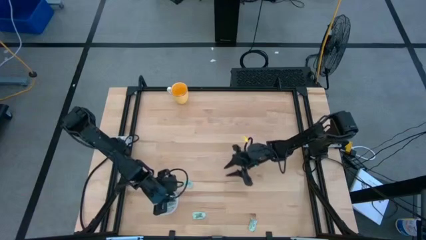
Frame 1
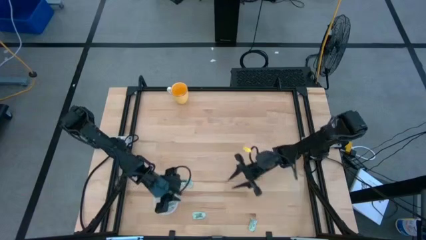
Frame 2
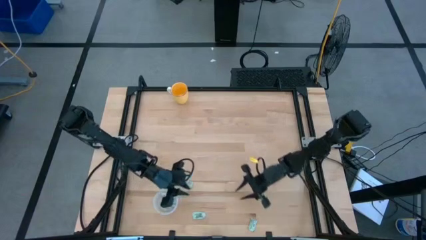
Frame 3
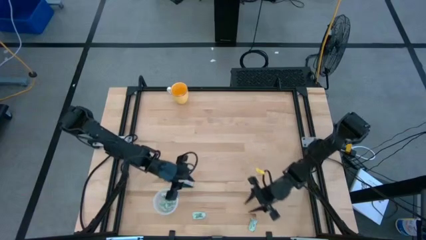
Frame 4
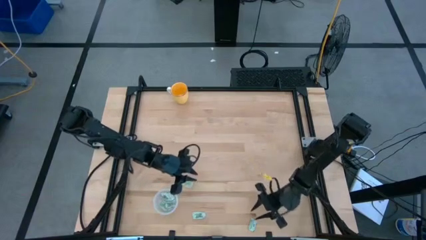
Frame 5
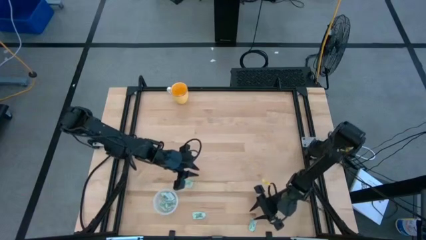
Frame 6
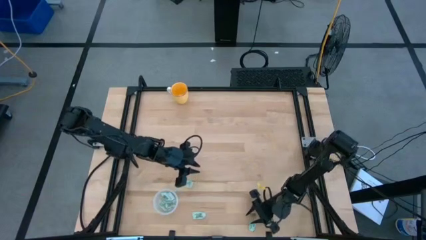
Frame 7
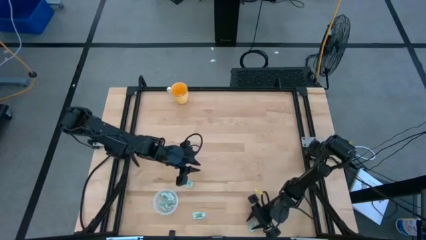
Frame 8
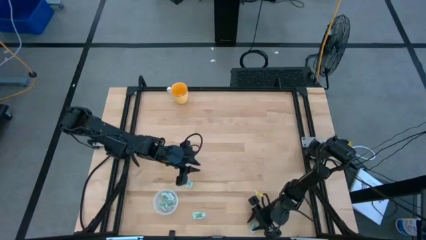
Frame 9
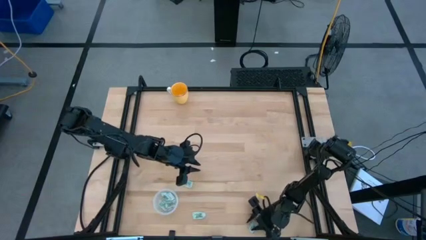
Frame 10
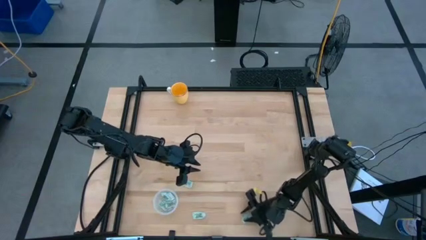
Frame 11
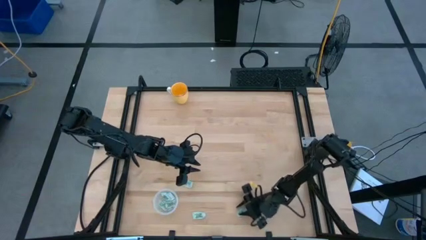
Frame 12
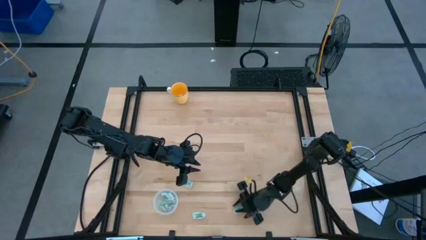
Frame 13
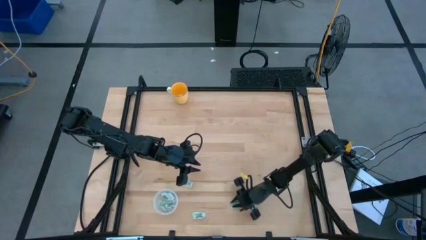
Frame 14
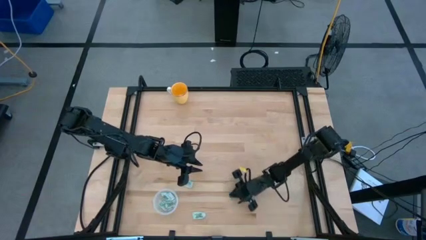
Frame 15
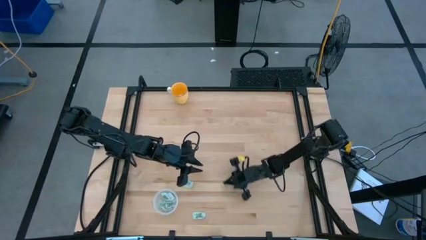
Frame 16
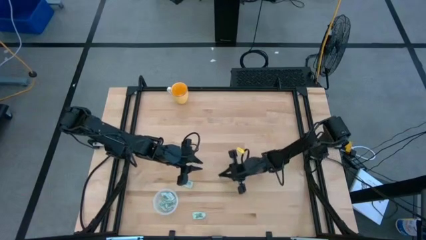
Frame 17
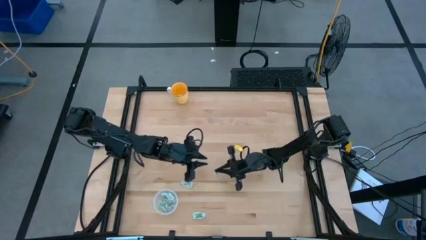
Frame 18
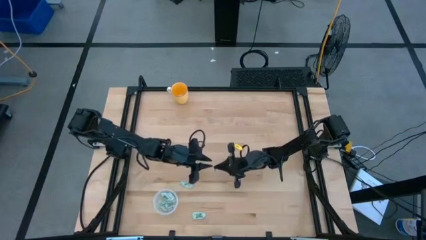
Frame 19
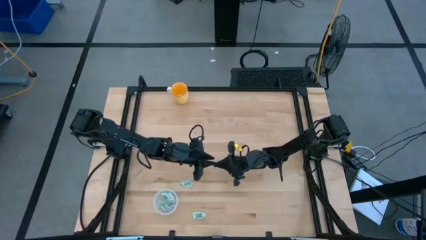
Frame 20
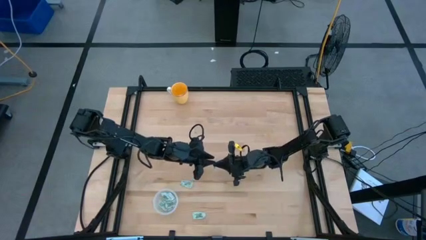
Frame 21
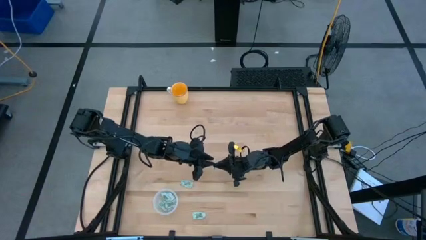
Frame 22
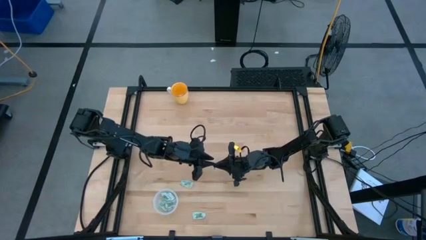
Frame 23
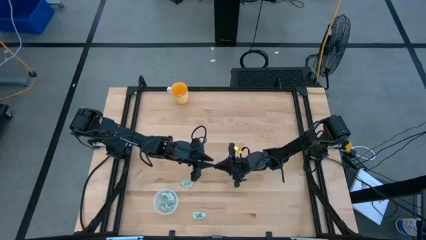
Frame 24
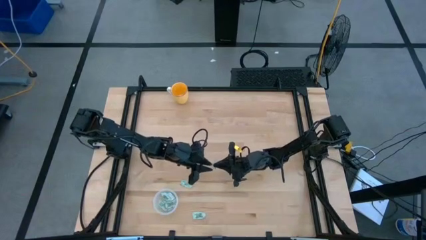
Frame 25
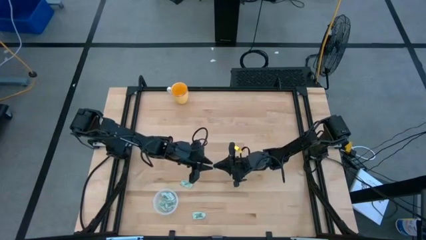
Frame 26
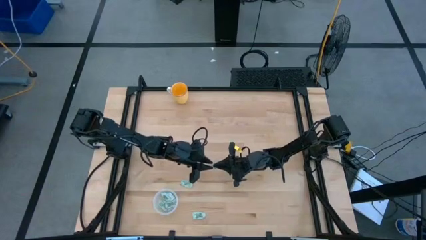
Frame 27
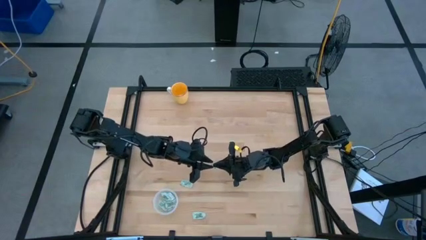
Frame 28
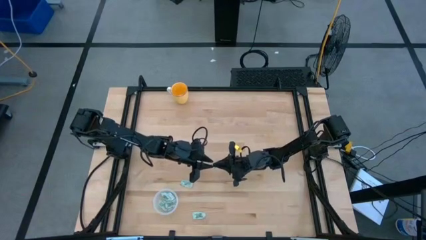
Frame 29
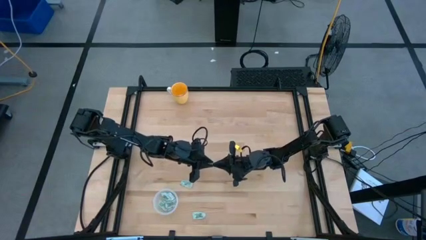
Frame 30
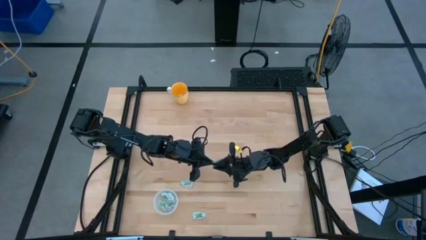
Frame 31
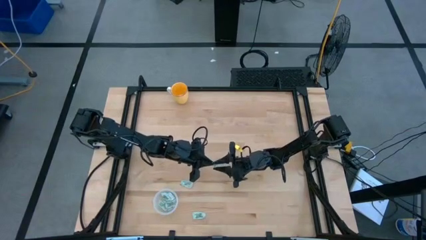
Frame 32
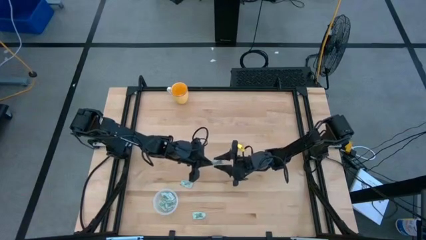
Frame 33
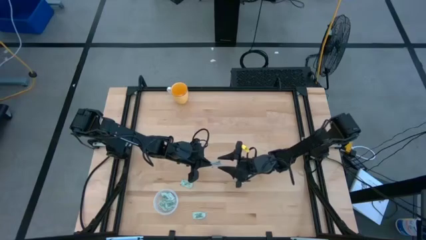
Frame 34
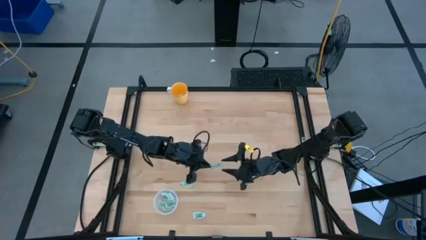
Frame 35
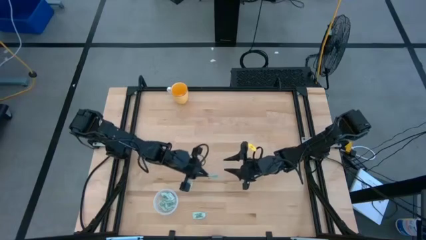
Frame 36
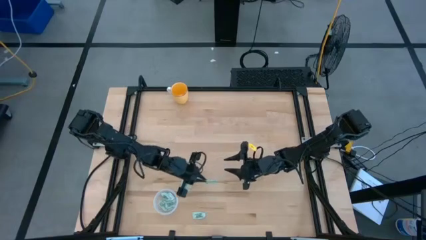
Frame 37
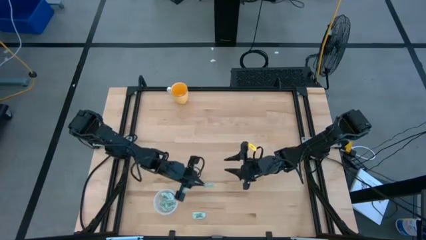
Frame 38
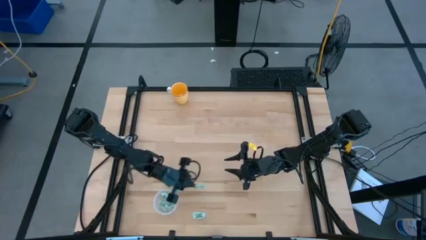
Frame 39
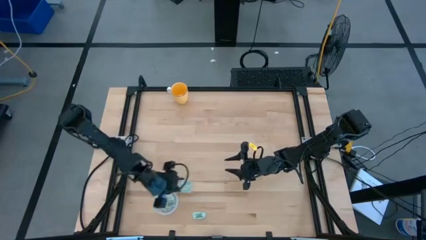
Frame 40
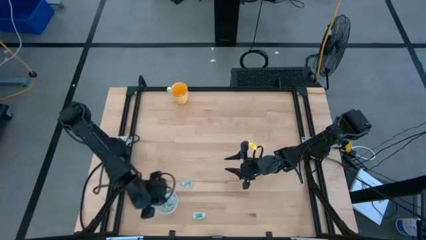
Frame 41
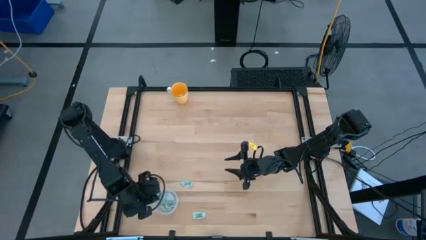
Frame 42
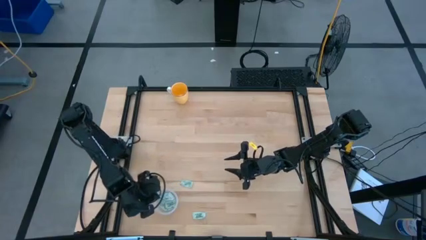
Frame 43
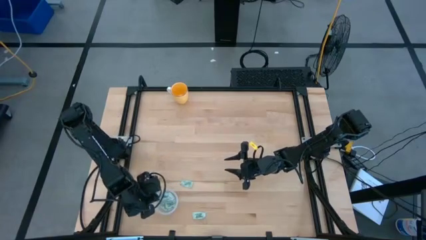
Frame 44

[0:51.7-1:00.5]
Task: Pick and place Stevia / Truvia into bins
Put the stevia packet into the transparent container

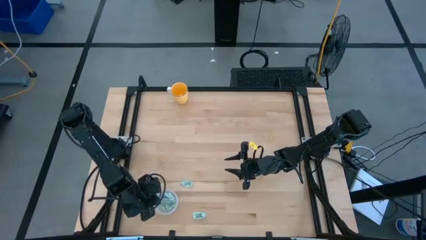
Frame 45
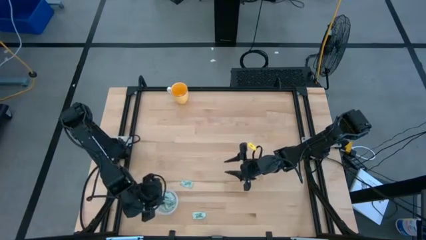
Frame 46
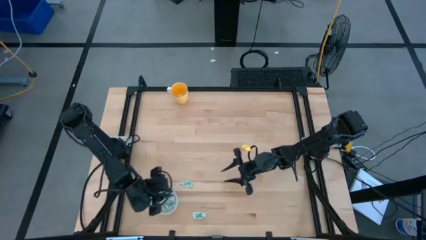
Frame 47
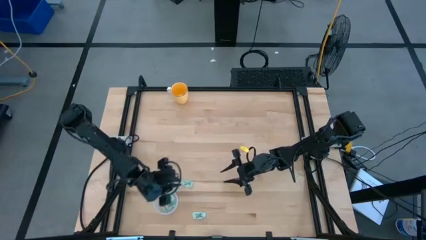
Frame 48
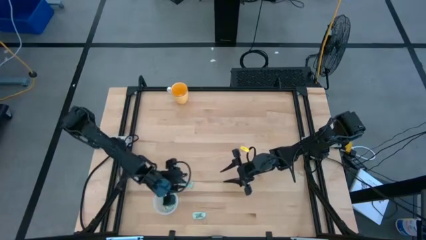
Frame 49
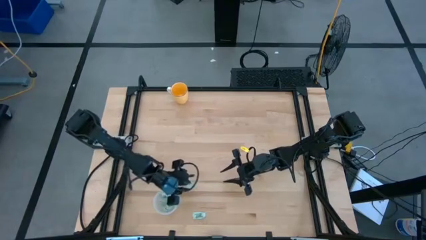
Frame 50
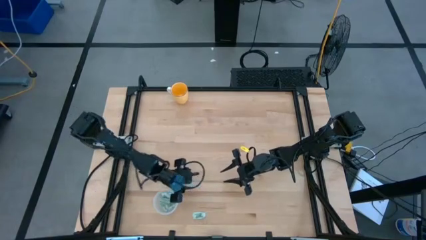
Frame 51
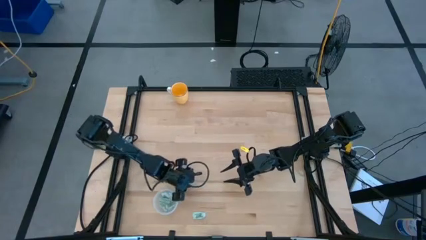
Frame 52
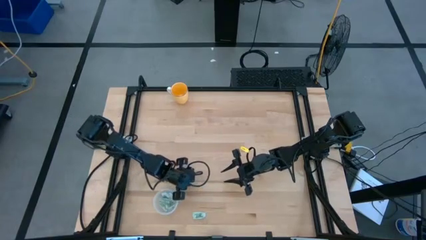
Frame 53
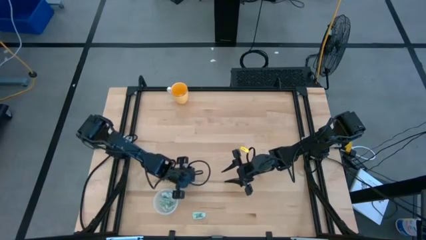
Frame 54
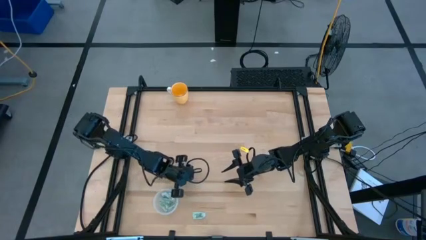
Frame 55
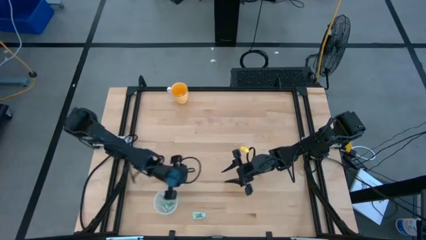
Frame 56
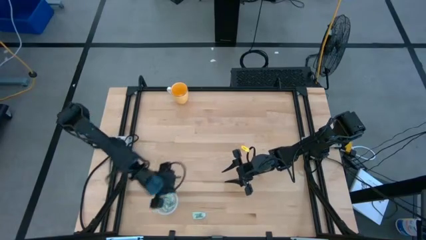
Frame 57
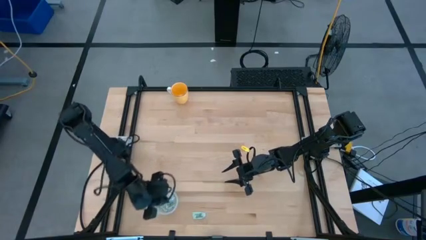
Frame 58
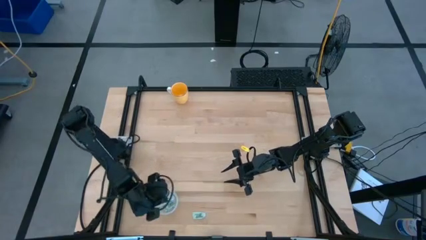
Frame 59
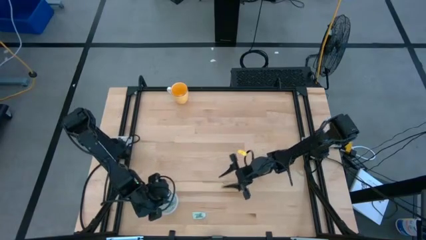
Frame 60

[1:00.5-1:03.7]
Put the stevia packet into the transparent container

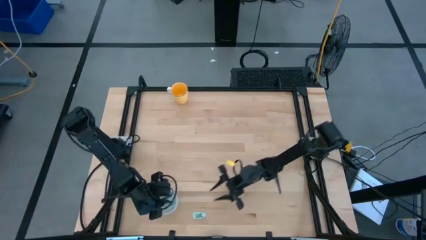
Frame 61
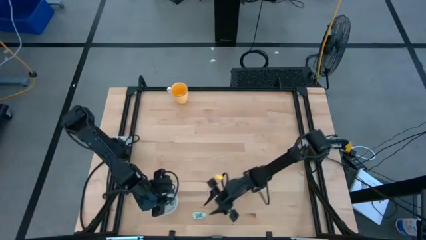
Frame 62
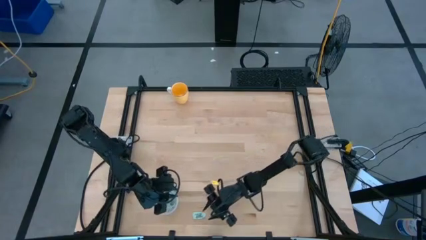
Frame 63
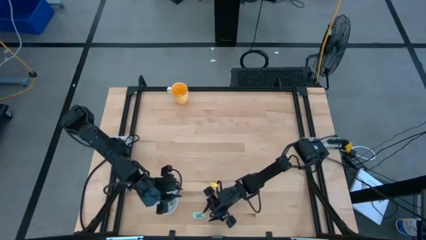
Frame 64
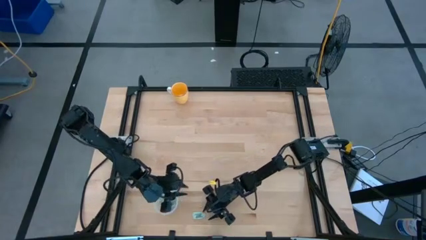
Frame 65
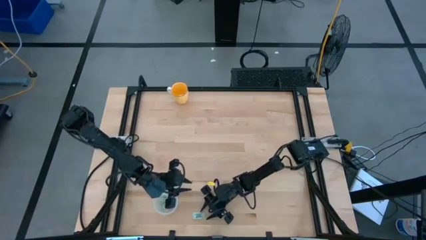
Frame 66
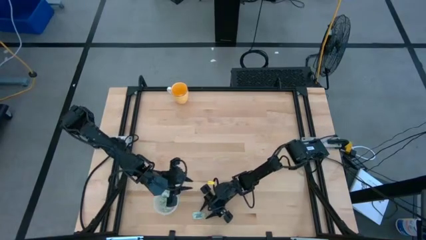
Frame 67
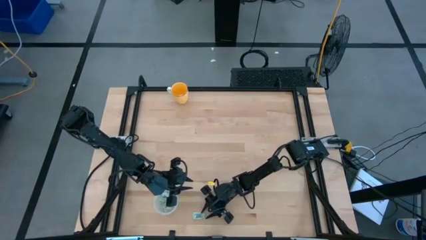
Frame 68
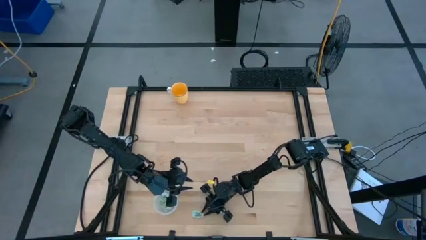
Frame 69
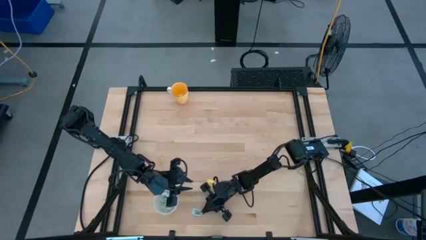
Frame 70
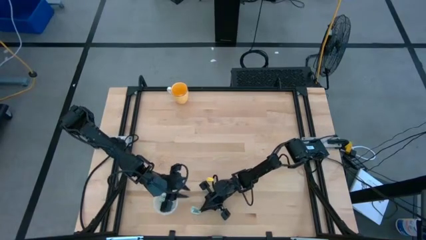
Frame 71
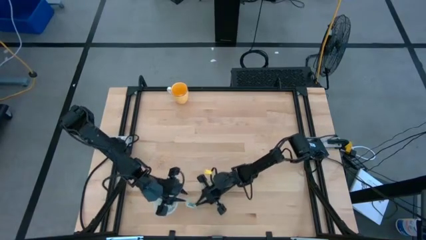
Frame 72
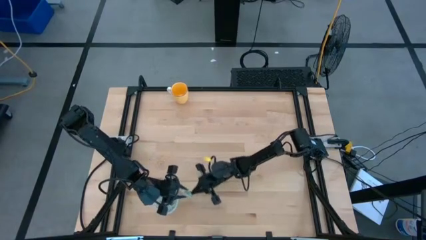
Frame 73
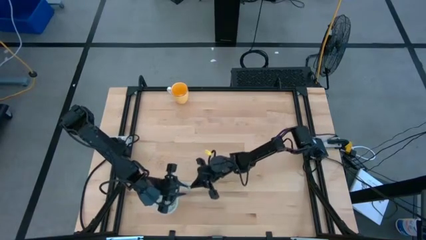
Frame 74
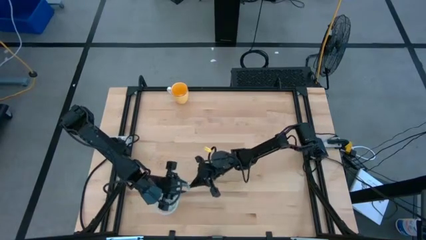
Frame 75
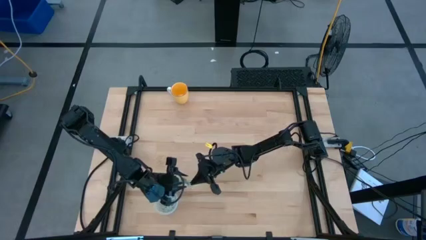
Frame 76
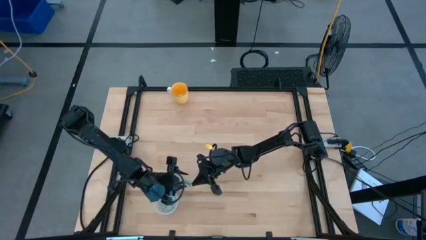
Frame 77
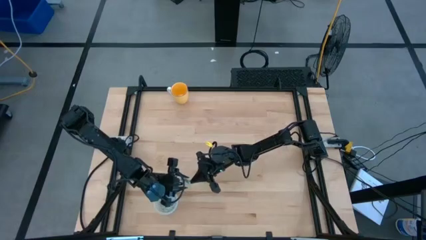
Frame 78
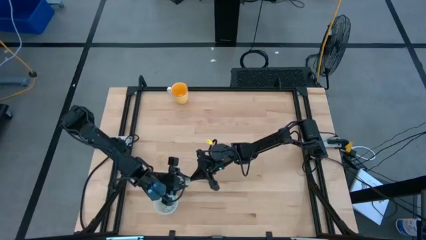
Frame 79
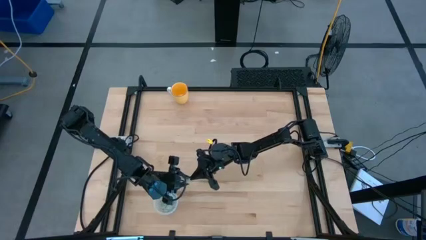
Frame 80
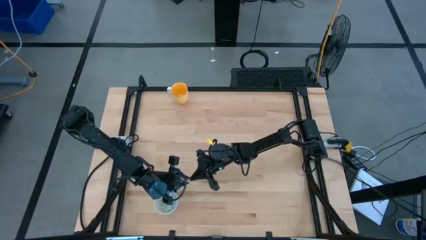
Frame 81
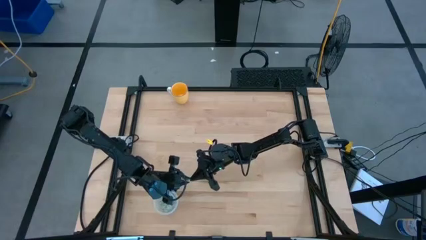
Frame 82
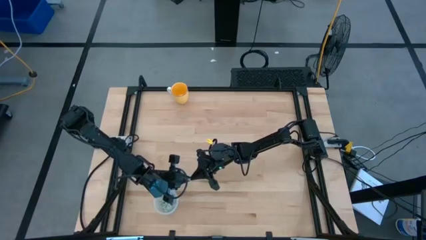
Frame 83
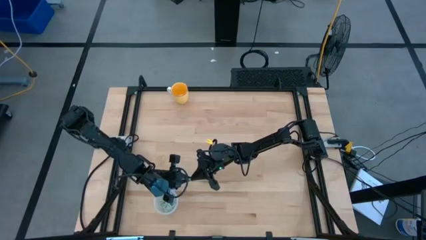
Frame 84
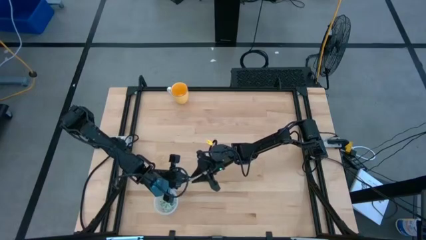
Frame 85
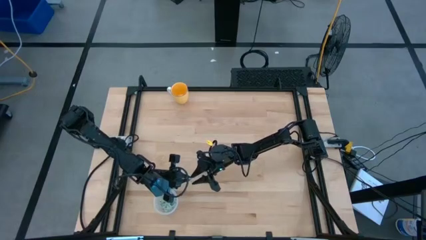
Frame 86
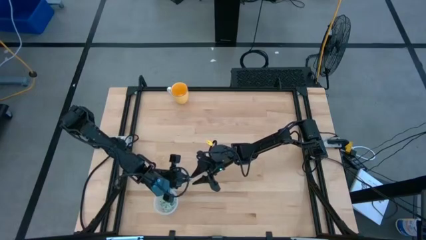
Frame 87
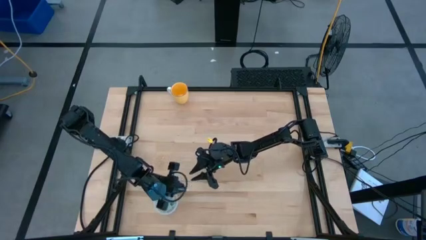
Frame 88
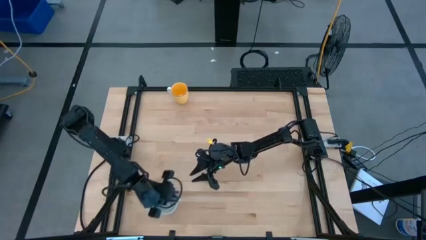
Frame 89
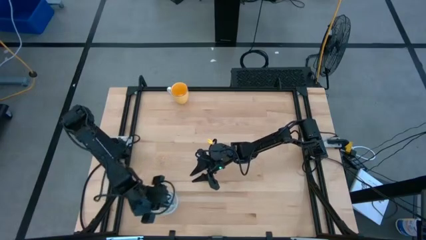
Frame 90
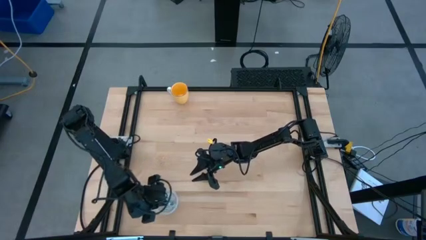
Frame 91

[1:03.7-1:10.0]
Put the stevia packet into the transparent container
